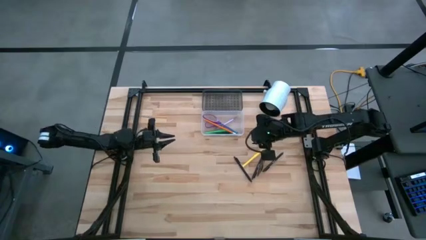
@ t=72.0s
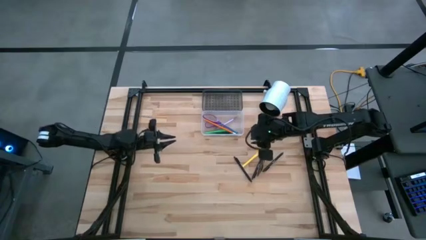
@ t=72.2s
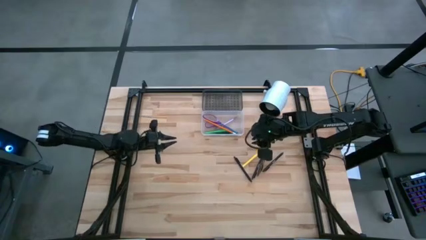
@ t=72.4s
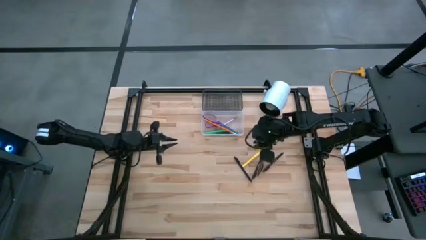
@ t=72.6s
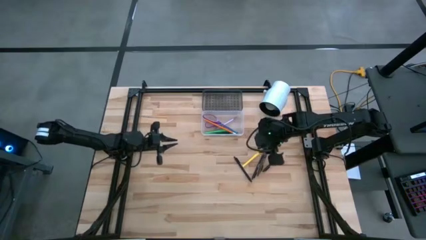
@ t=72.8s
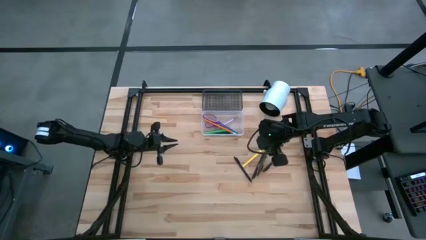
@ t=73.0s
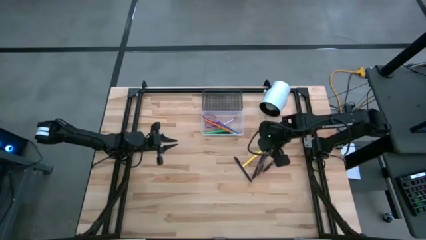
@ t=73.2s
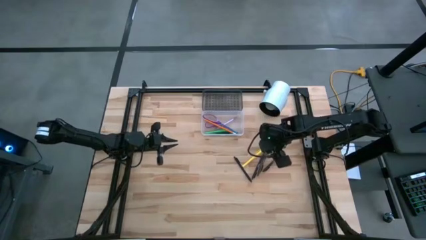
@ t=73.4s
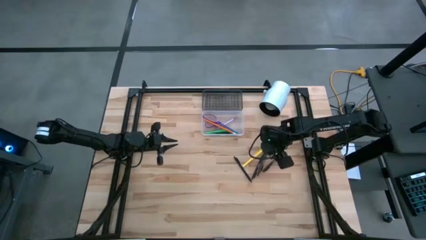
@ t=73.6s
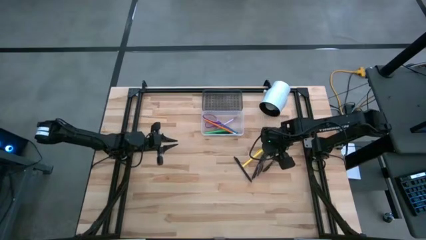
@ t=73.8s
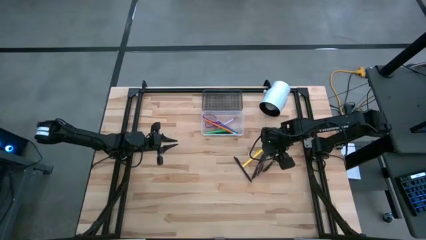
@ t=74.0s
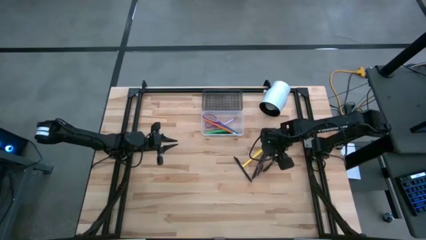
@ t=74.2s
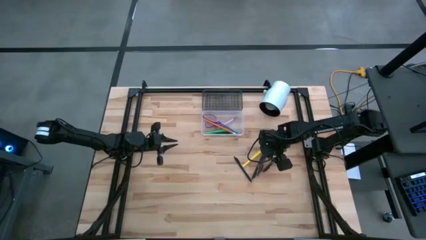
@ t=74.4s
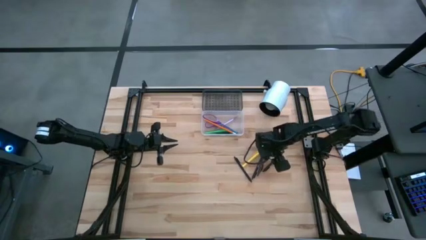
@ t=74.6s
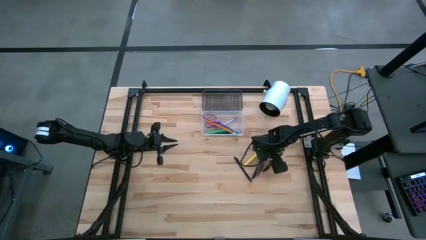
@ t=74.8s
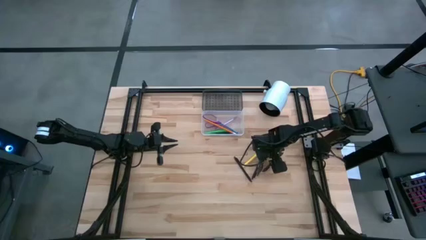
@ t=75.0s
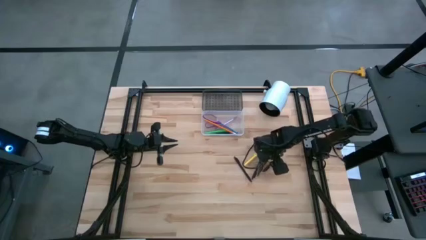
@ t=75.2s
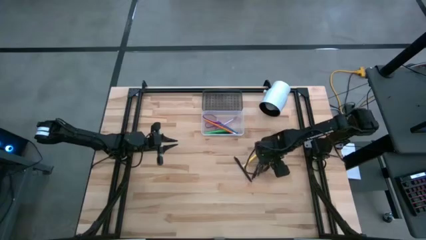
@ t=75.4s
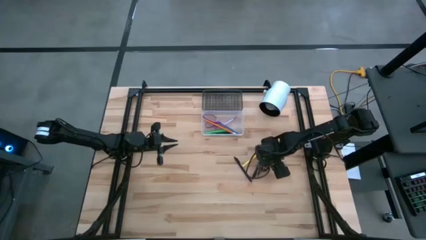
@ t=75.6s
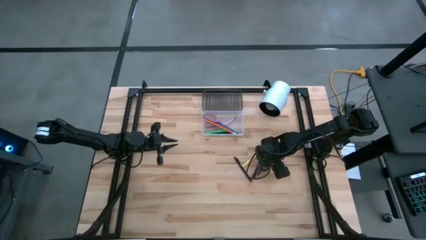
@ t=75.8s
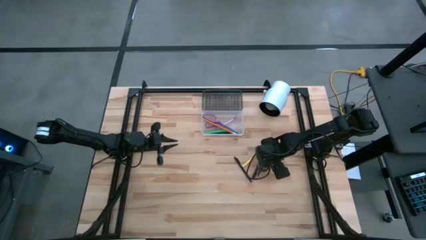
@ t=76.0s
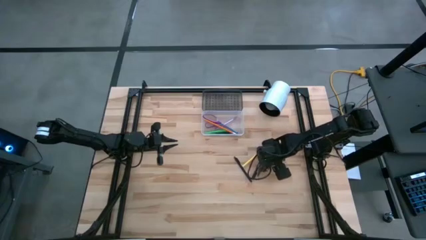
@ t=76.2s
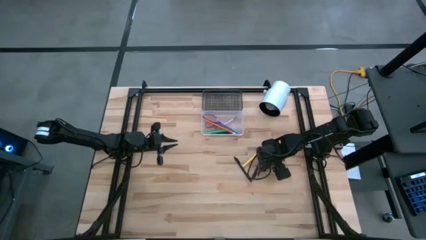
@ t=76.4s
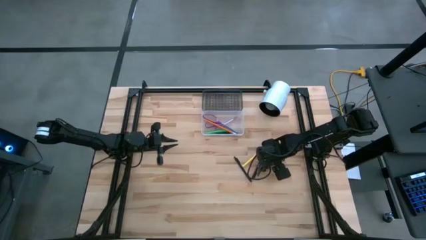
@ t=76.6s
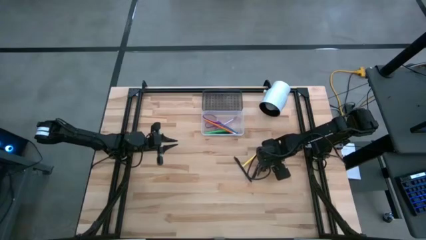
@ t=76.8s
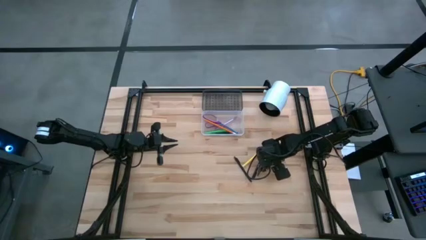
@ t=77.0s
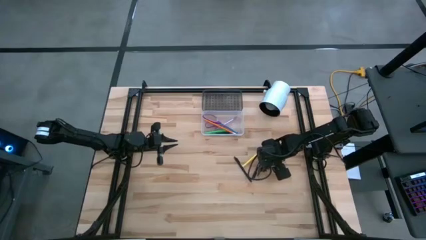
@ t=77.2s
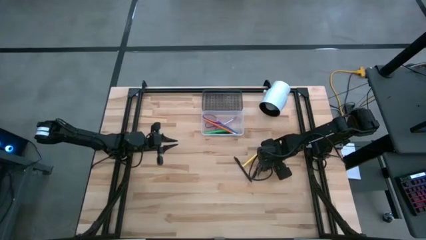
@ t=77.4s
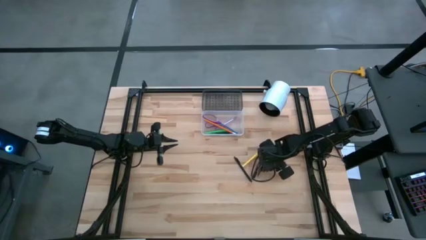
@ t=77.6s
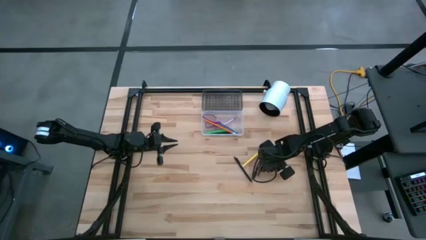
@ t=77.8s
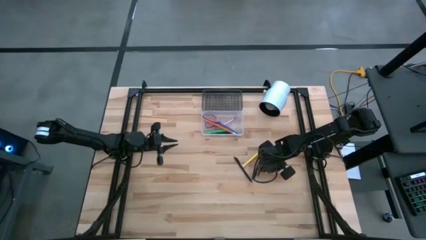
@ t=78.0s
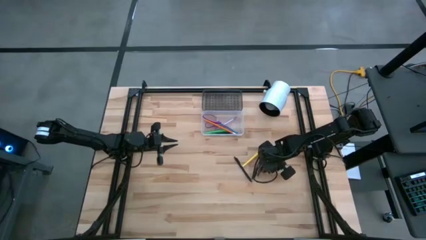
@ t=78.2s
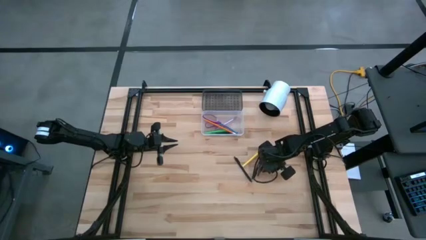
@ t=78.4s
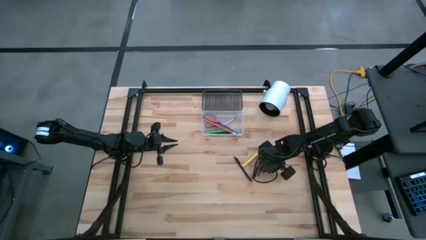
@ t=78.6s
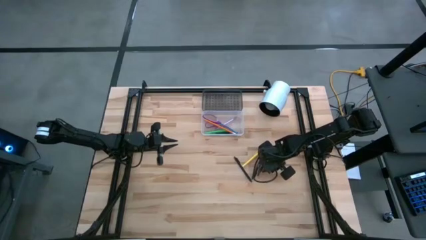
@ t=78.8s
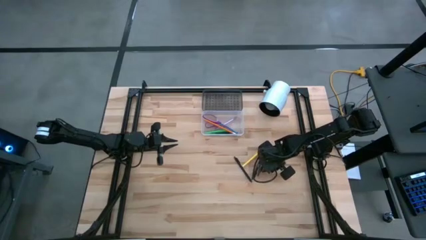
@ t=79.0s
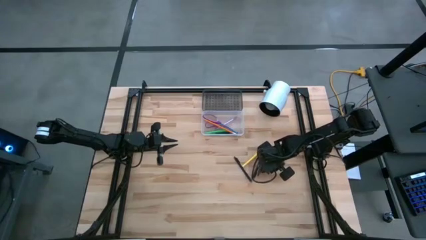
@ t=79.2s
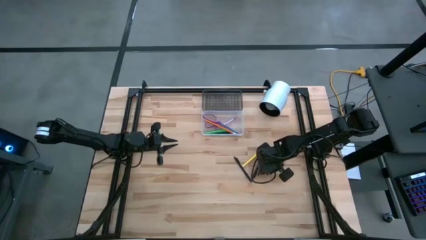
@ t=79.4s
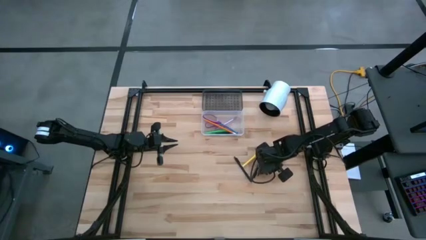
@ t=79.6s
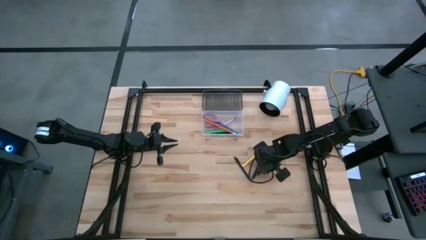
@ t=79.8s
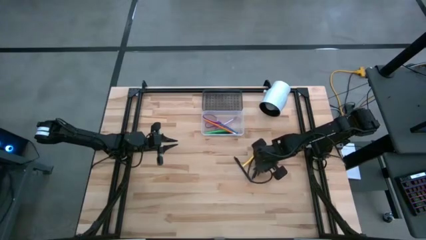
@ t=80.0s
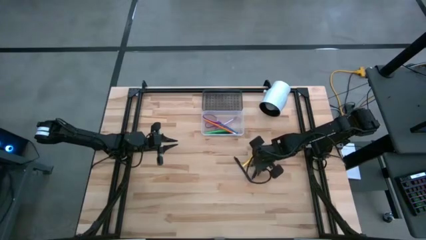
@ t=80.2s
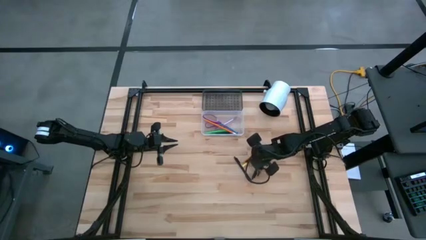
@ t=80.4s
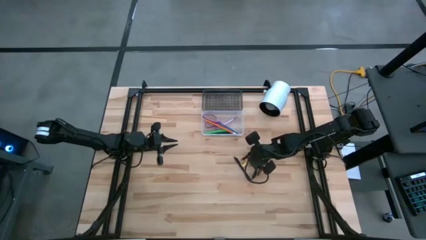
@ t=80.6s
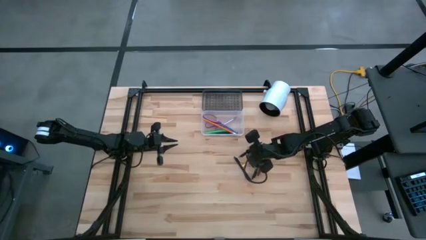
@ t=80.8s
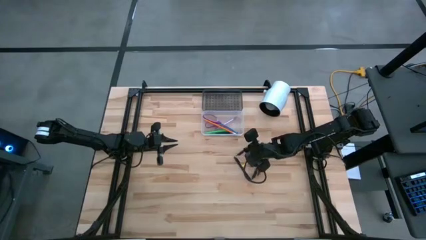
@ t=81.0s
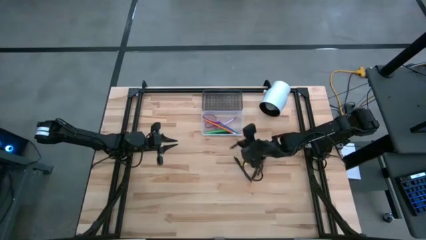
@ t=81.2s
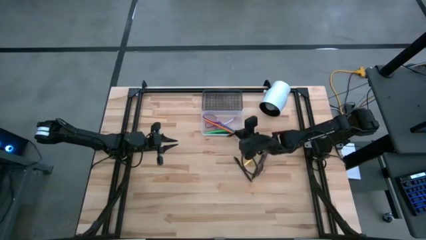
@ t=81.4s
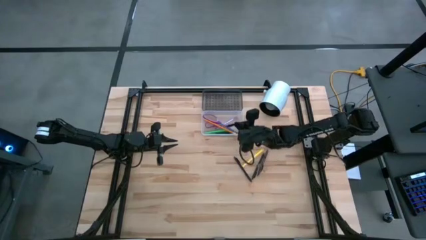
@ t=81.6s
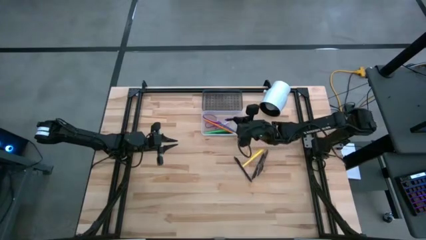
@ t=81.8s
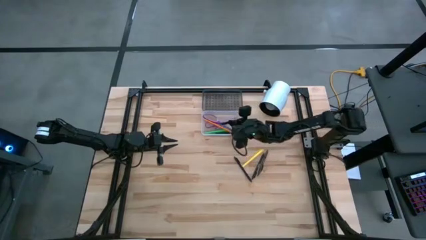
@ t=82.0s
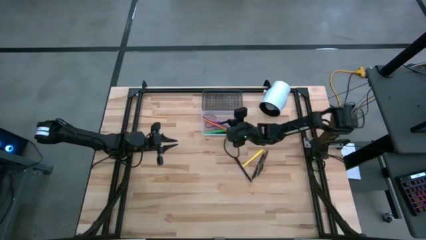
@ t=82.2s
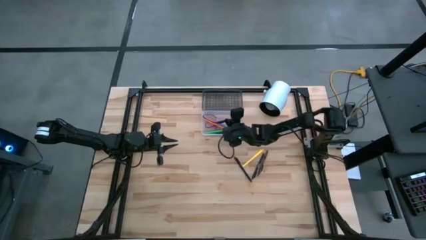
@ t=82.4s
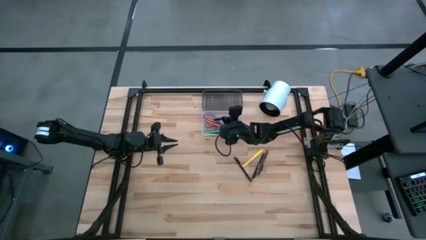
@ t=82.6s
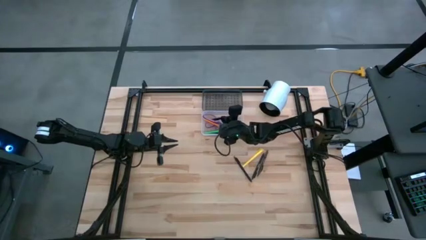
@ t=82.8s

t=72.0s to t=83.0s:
Task: Pick & place school supplies into a supply box
Put the black pen into the black box

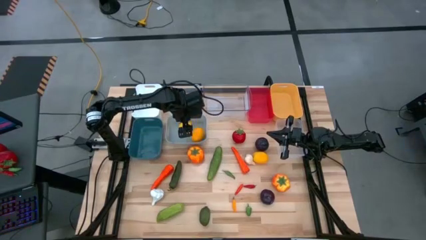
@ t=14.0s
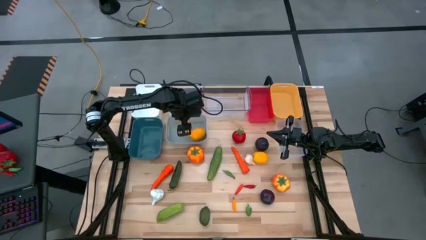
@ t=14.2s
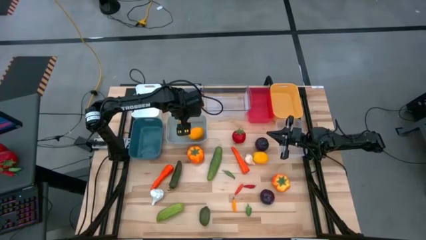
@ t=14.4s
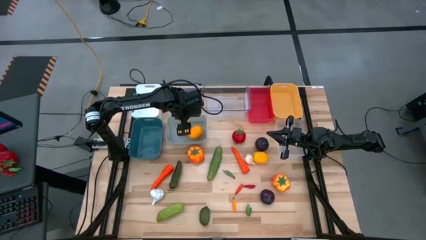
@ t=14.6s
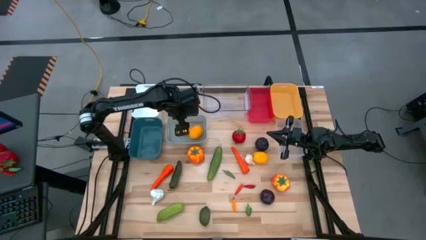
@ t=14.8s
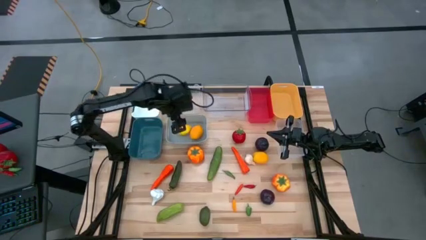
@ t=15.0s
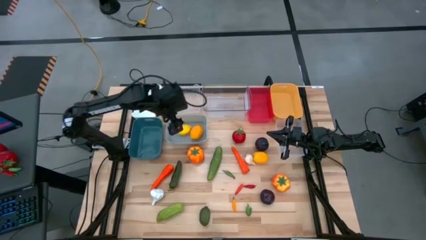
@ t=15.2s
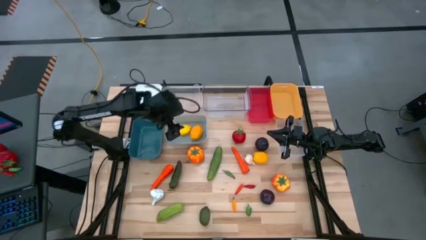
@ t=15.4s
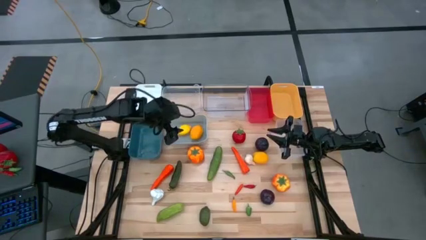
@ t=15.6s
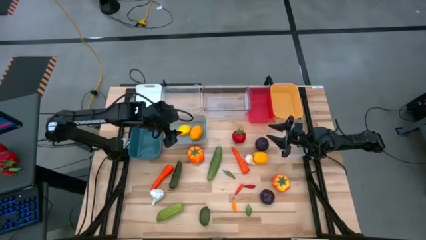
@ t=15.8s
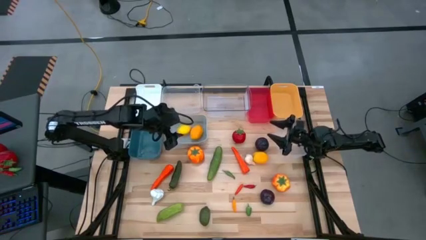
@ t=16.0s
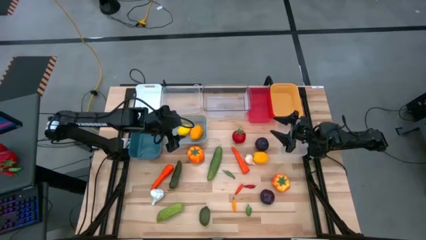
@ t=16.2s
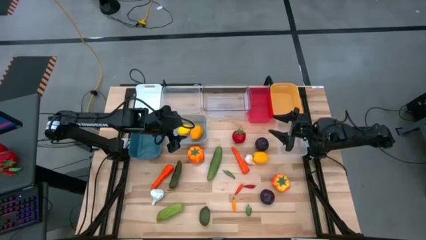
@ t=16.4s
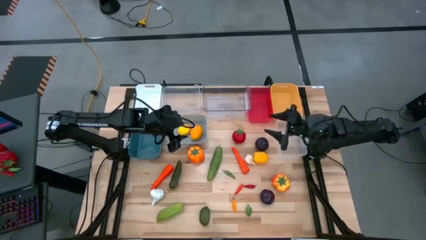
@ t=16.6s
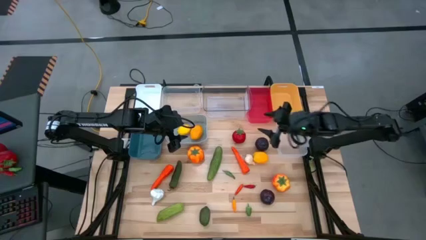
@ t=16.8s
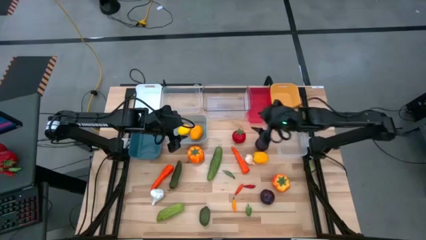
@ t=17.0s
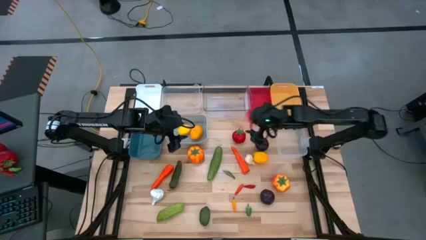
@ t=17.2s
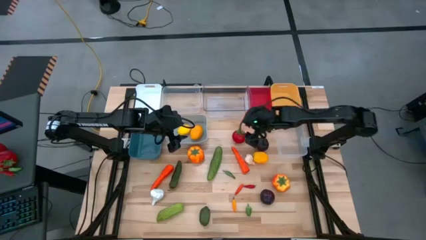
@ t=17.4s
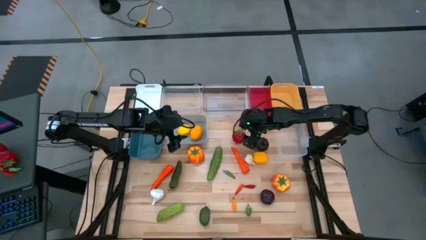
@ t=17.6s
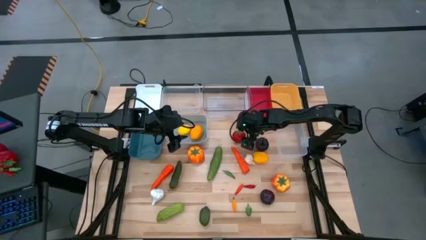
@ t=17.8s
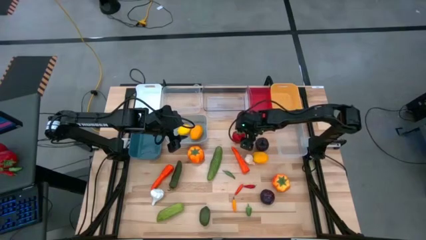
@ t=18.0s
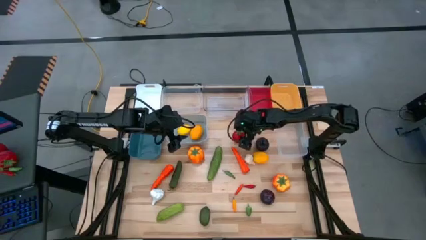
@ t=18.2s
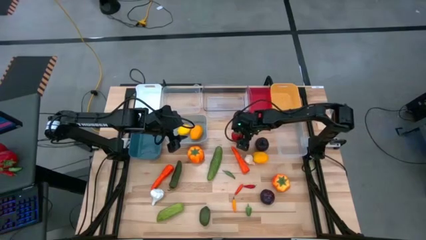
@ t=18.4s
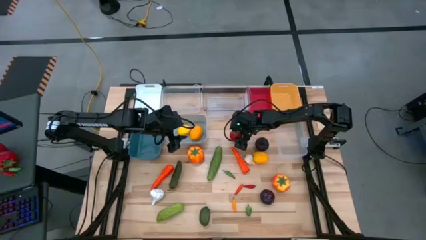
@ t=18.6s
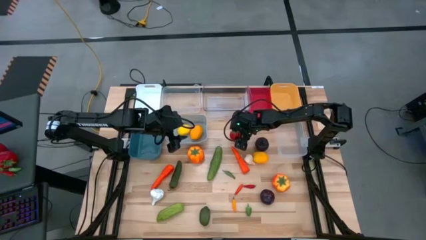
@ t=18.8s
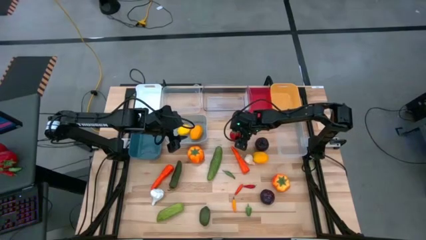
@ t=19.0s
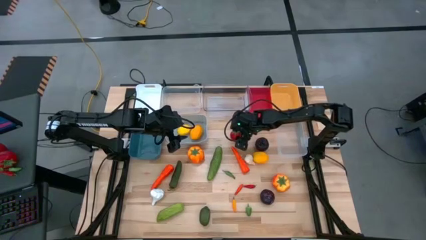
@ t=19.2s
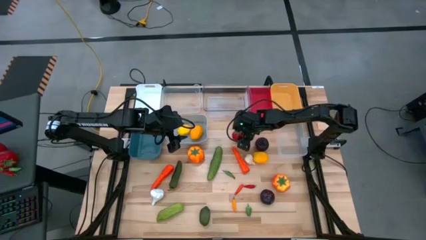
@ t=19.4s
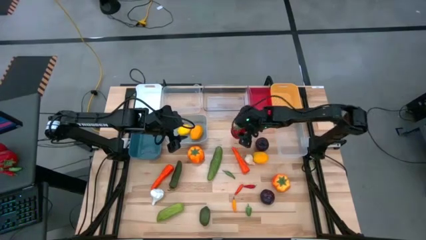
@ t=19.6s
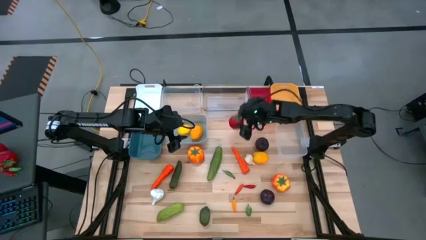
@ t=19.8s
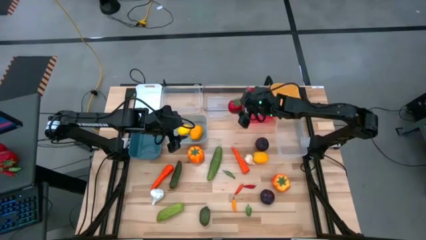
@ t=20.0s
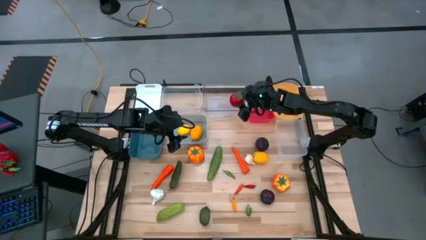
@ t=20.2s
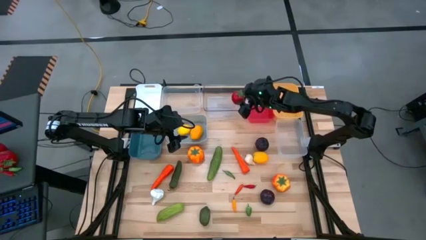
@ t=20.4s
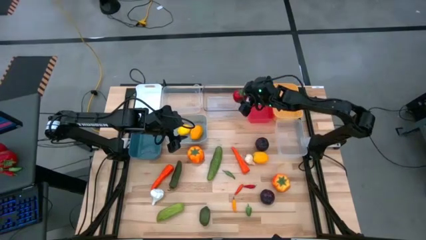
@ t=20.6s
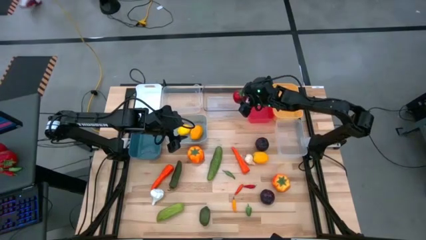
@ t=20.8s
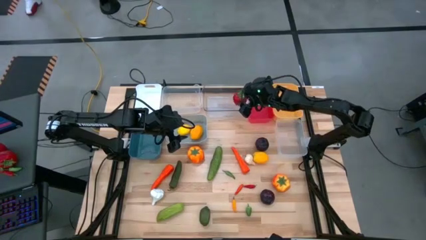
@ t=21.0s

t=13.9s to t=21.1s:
Task: Sort produce into baskets
Put the red tomato into the top right transparent bin
